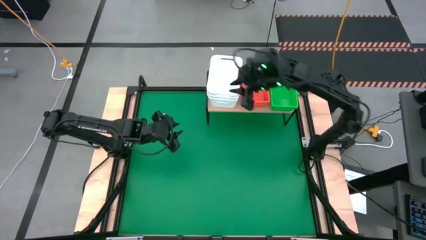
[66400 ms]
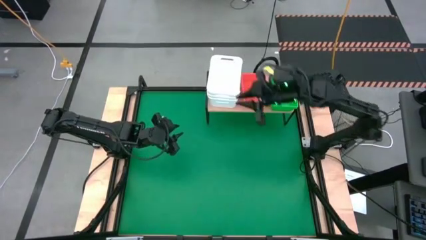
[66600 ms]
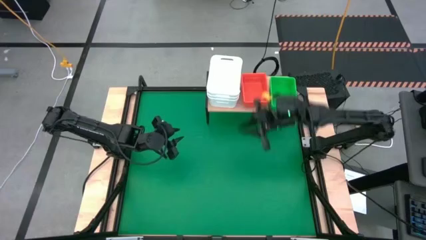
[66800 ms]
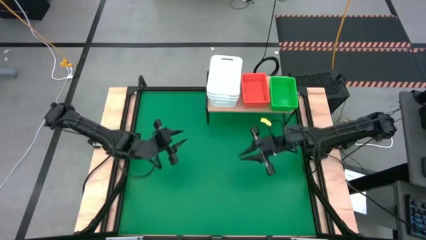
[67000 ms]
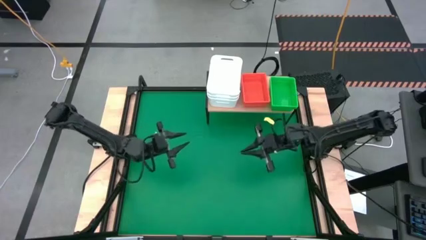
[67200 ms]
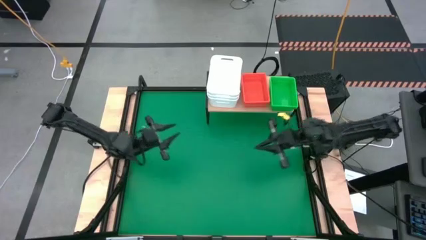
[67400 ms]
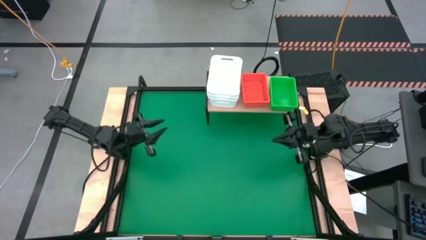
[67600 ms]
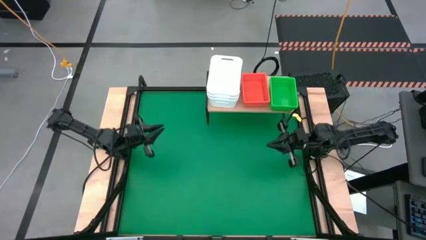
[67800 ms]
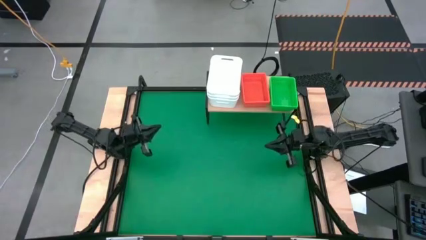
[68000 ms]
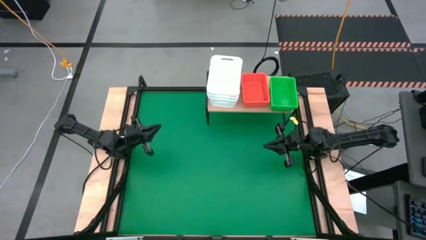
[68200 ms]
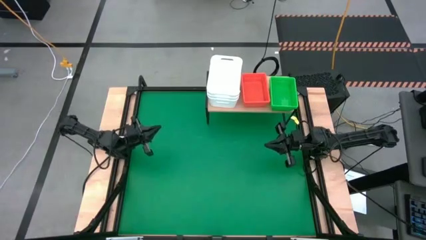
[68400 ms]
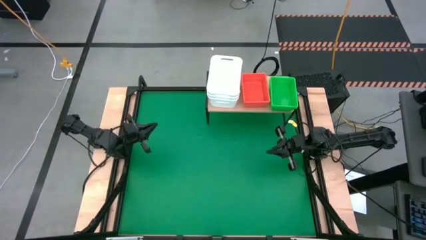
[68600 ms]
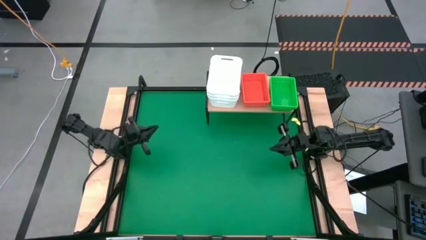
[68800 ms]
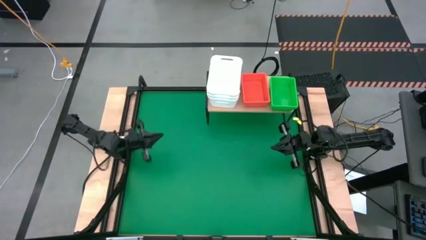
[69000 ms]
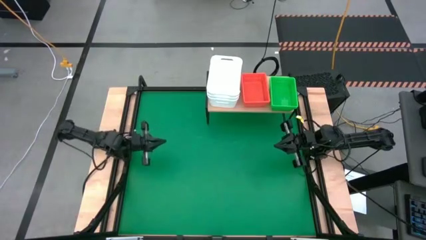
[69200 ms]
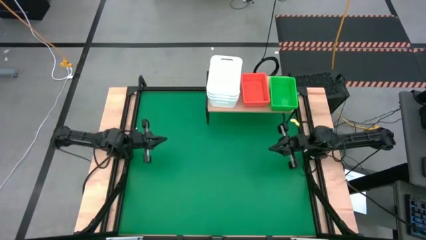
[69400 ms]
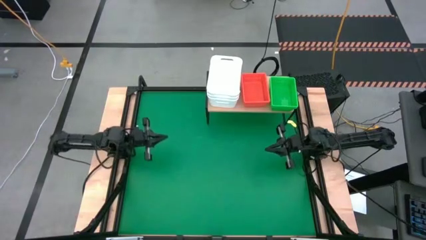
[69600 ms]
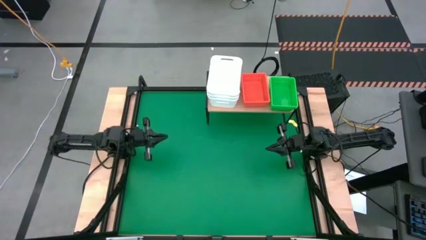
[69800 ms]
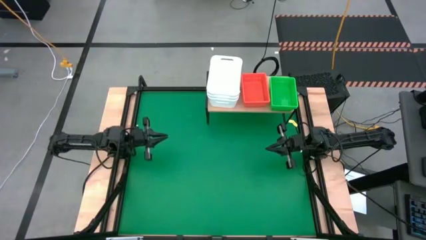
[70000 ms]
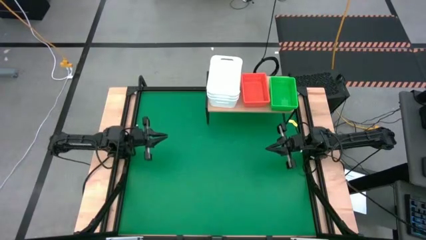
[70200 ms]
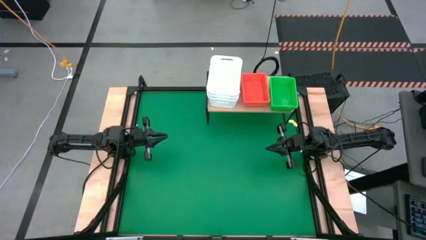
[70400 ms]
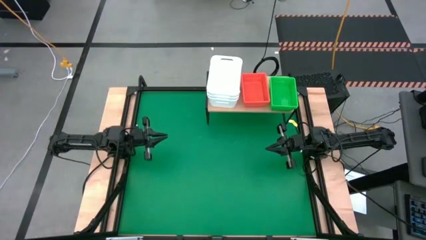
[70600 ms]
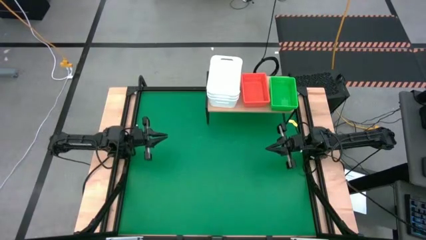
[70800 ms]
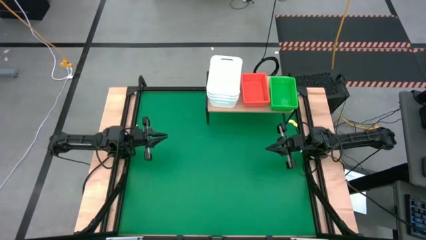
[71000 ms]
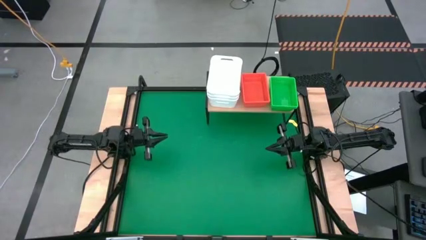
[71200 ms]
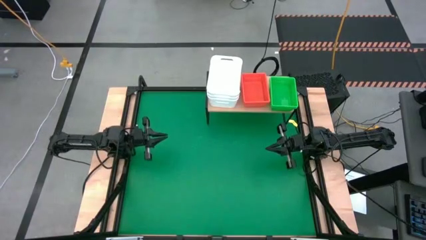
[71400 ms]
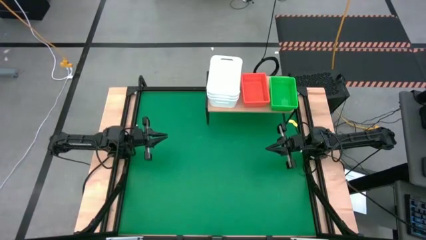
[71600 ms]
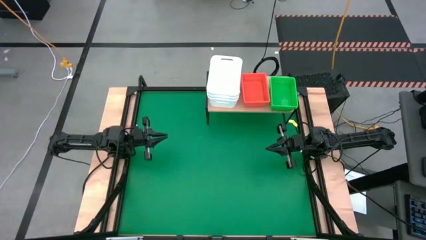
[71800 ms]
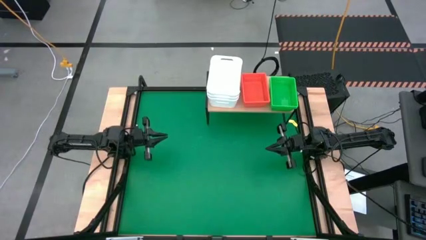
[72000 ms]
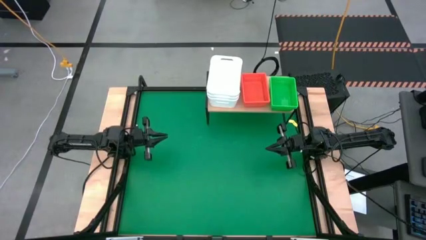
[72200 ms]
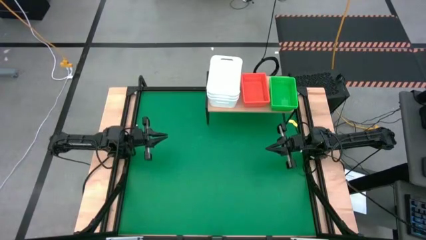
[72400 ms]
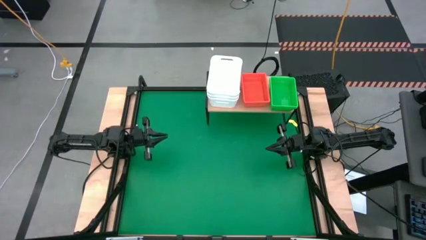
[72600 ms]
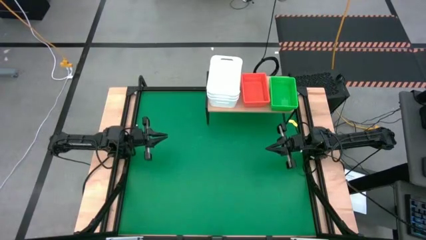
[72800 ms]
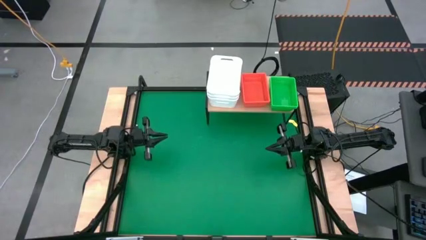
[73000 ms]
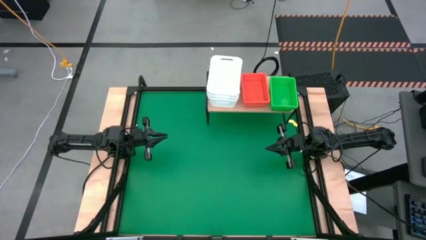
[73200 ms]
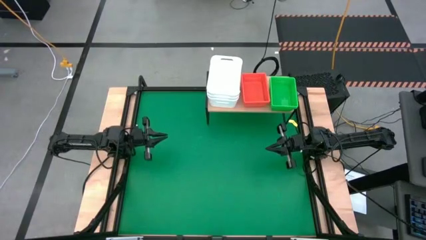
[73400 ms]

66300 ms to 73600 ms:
Task: Stack baskets on shelf by color
Return to Home Position

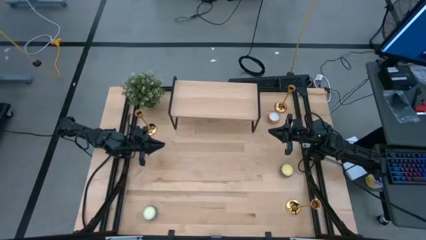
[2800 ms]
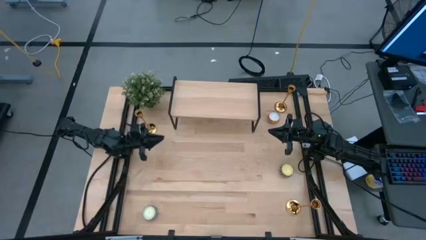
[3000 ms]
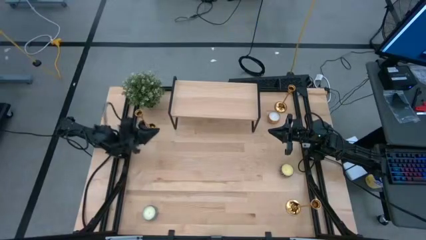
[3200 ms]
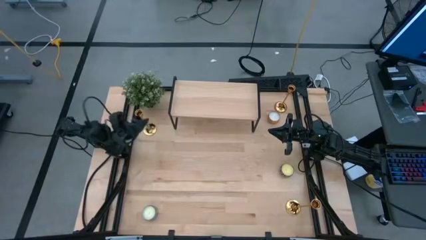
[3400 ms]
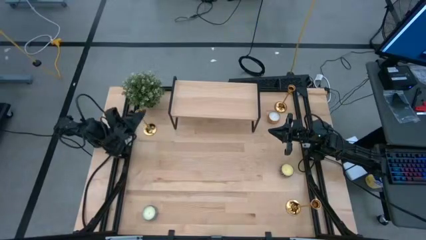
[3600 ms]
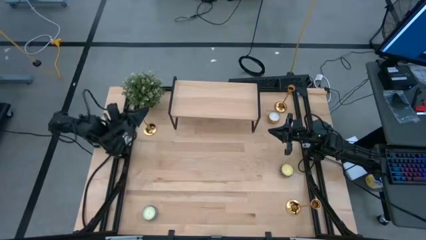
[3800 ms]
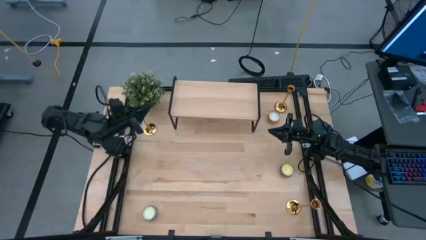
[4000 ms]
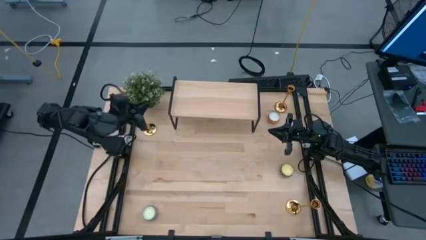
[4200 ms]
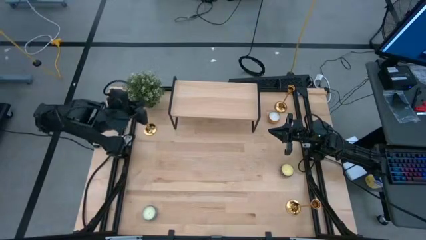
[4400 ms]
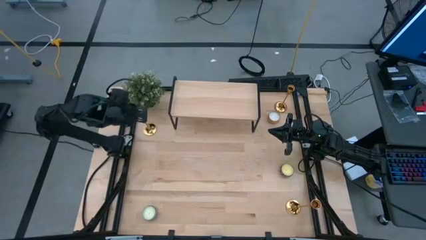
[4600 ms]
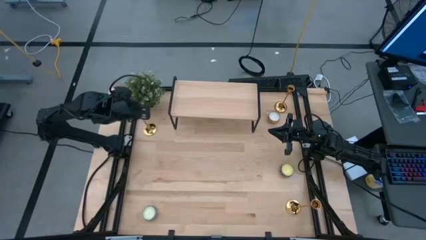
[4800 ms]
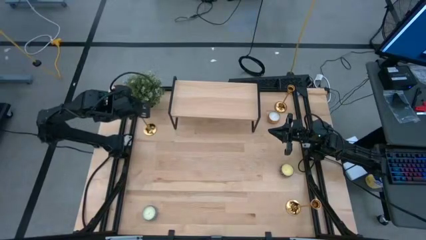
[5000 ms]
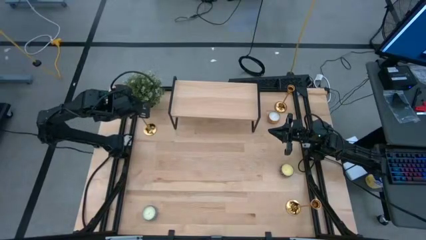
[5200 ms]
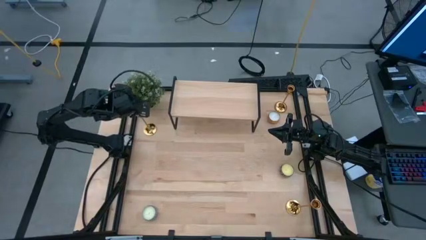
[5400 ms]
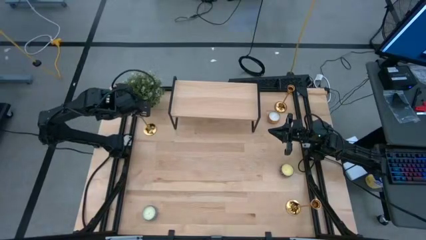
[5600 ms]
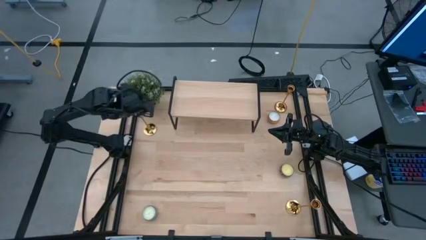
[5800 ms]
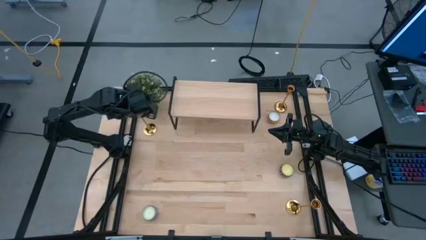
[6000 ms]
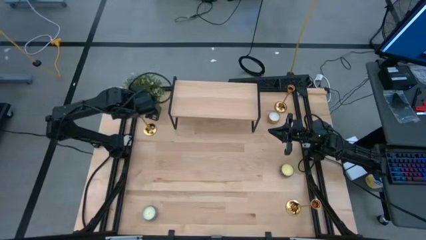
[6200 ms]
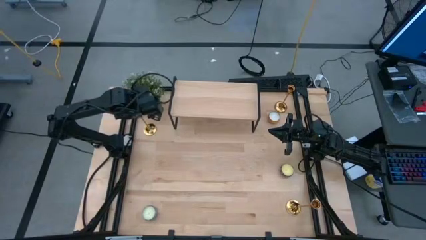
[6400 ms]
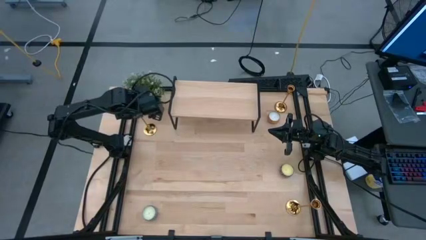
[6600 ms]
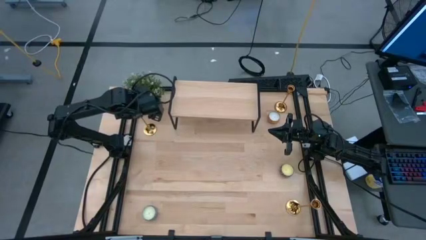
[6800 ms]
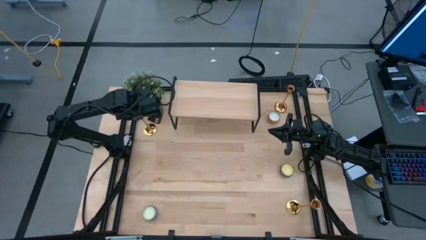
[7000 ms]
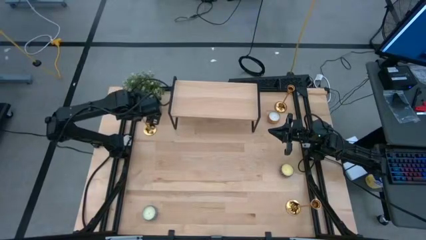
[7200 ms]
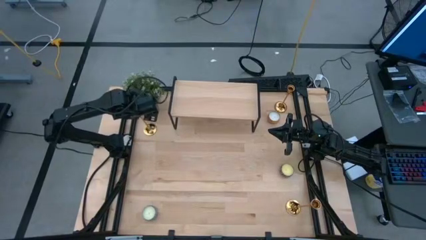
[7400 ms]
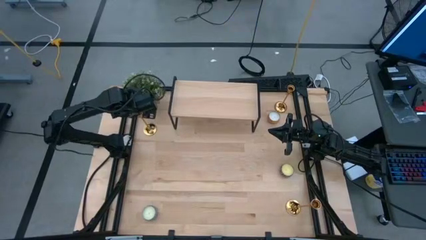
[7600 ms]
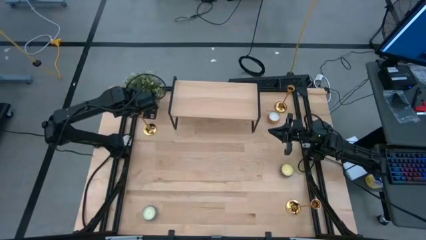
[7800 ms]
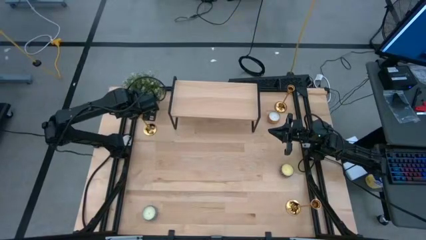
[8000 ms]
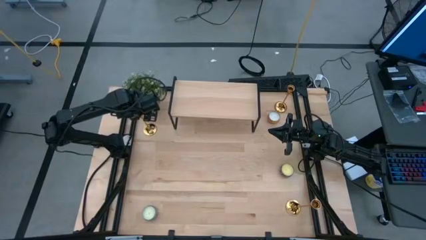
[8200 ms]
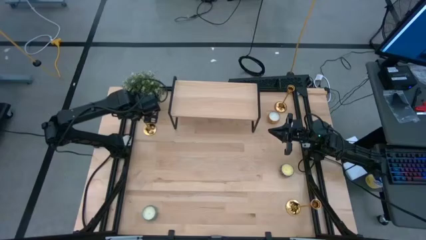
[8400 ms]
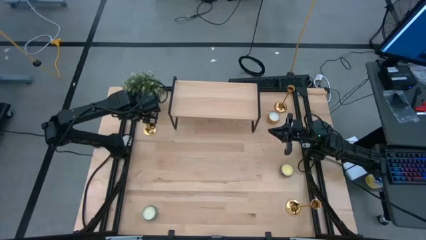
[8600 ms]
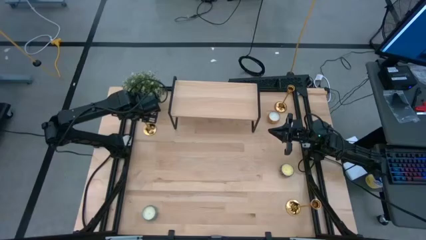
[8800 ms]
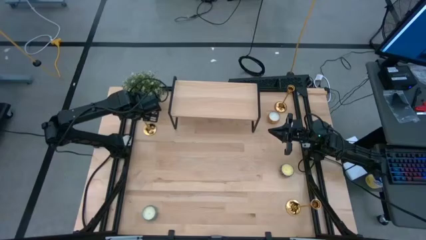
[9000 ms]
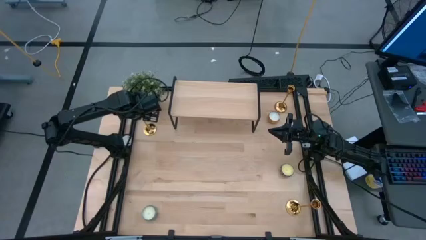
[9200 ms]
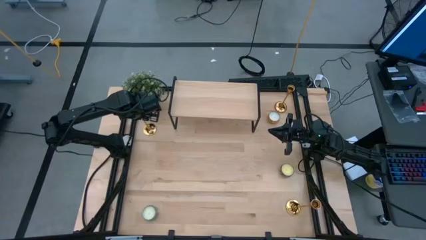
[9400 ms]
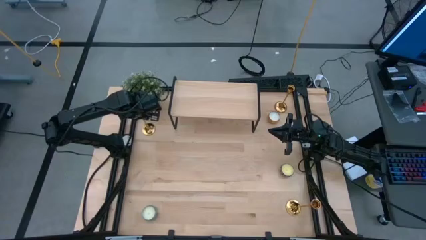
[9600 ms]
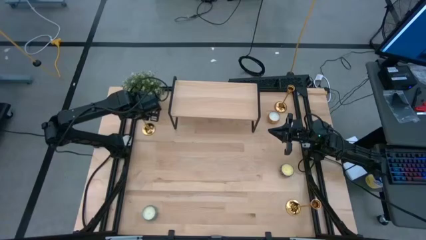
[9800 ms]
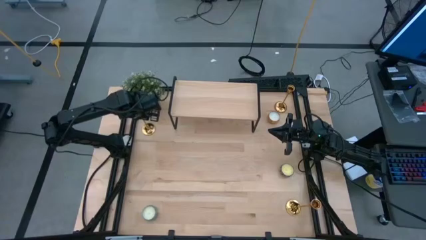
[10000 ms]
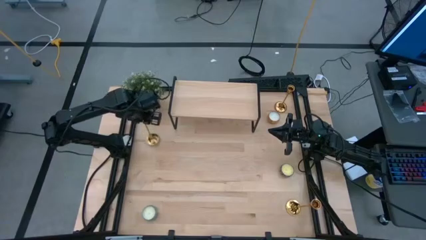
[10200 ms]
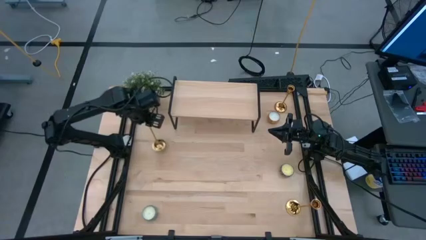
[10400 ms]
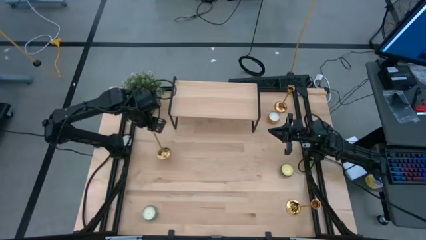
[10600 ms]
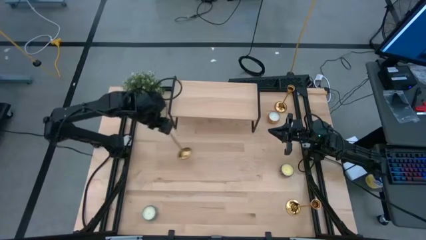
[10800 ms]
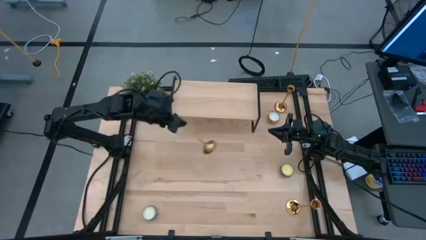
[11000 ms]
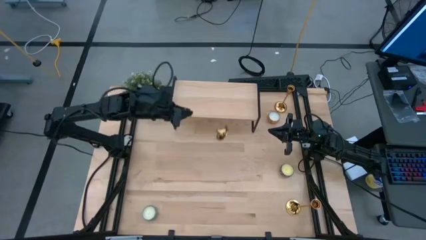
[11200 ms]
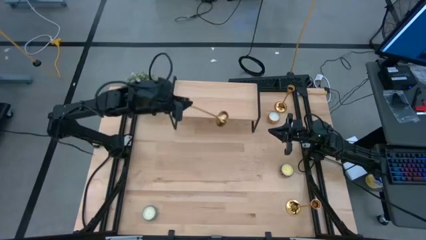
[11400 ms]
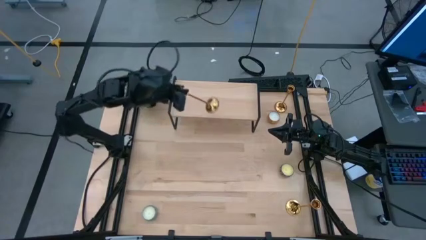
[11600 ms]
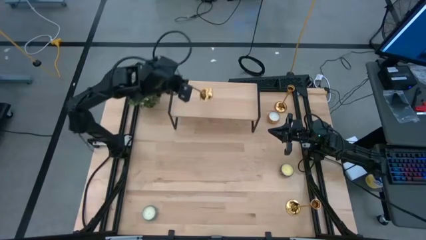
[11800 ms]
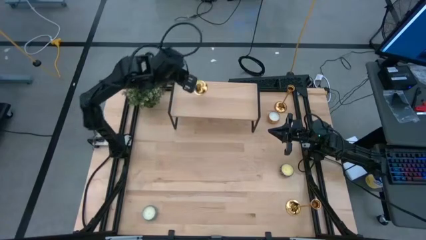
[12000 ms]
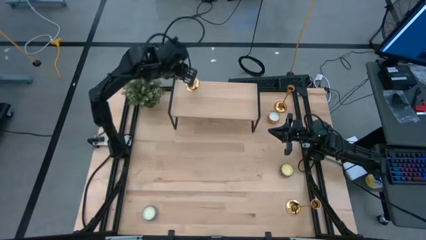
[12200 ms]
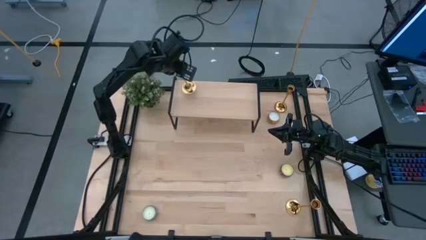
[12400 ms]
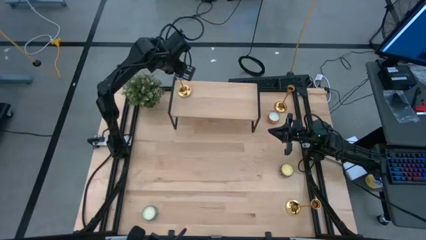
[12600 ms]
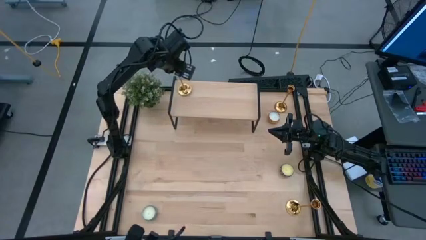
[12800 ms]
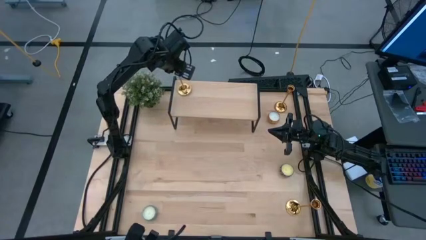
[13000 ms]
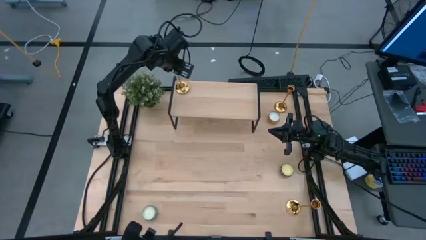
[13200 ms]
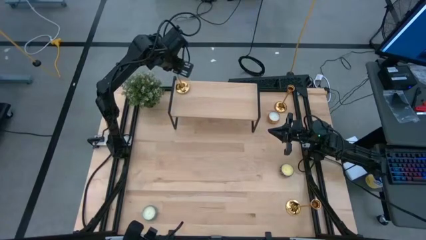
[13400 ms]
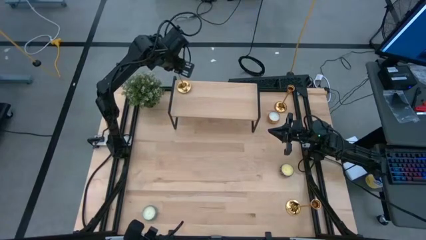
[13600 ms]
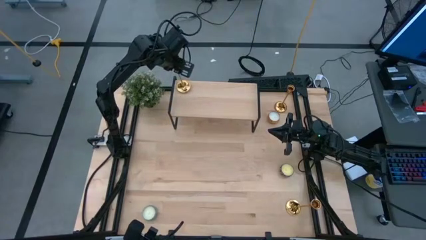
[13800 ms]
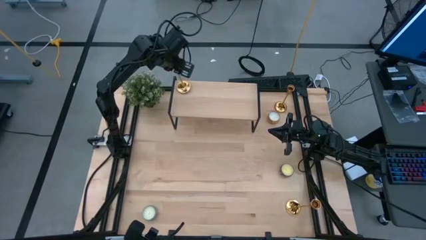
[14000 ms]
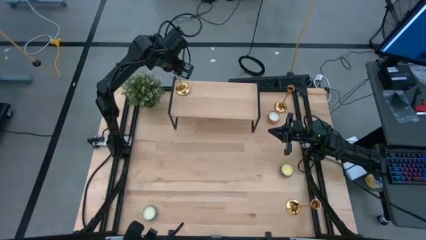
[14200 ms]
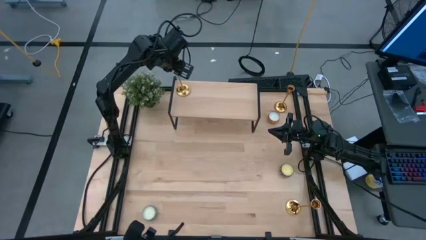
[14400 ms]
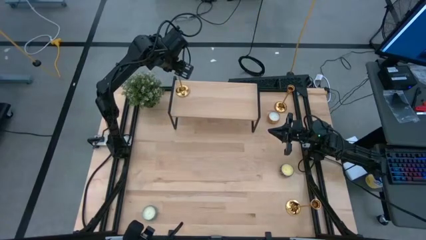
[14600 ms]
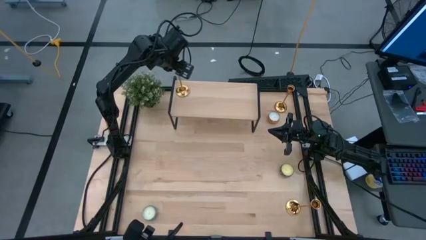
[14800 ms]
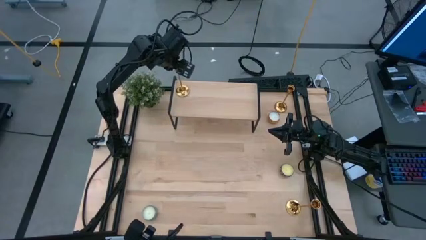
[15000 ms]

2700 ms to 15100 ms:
Task: Pick & Place candle stick holders
Put the middle gold candle holder on the shelf
